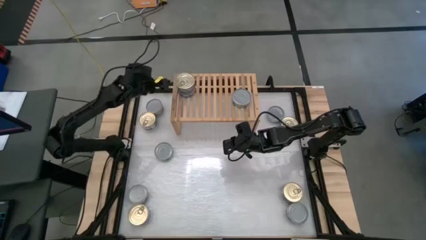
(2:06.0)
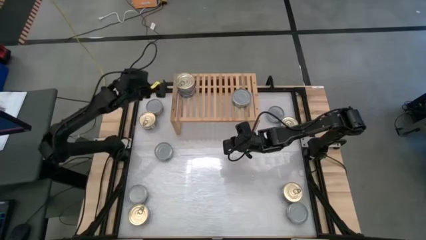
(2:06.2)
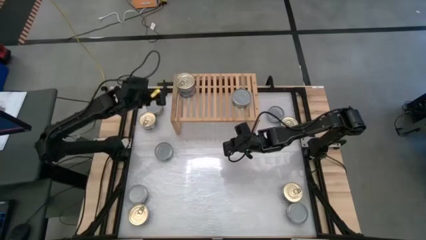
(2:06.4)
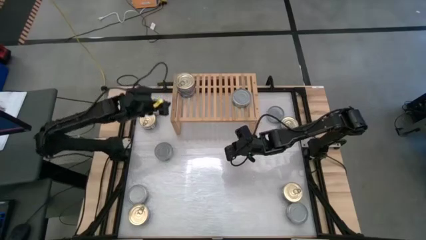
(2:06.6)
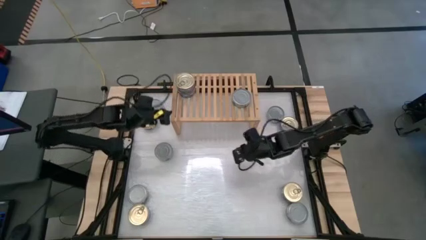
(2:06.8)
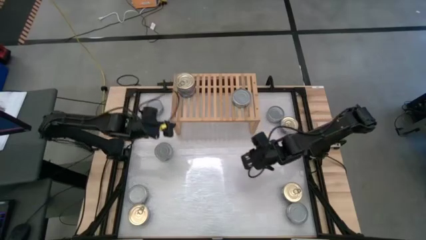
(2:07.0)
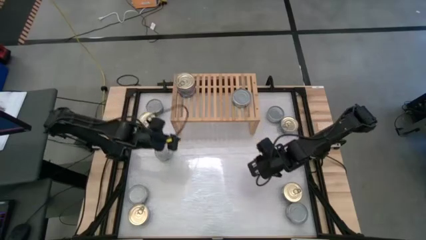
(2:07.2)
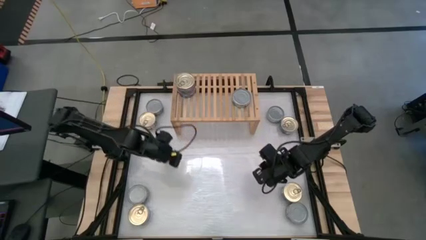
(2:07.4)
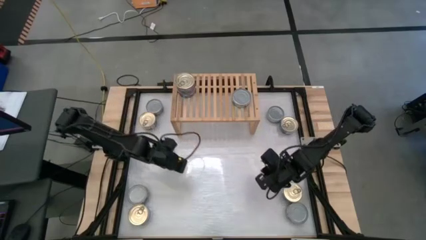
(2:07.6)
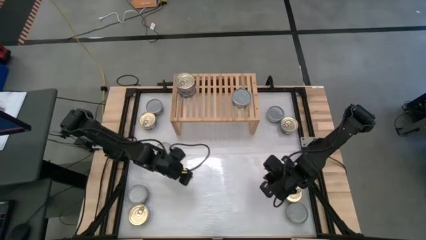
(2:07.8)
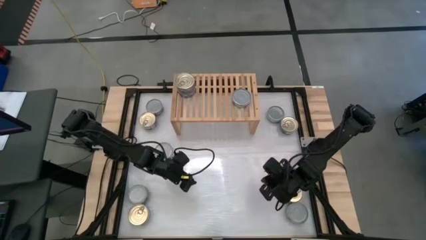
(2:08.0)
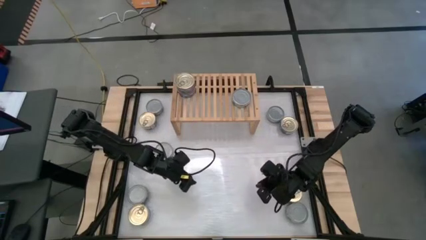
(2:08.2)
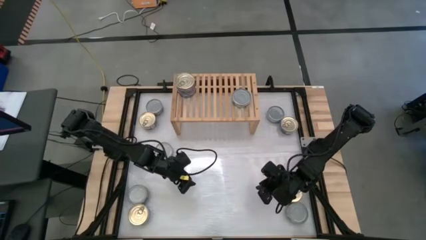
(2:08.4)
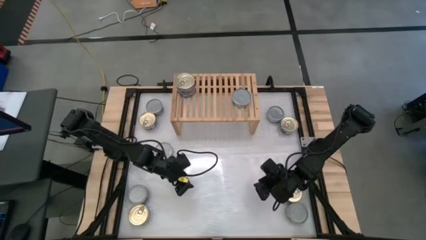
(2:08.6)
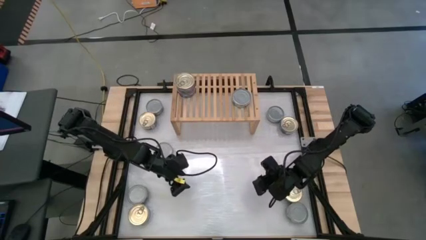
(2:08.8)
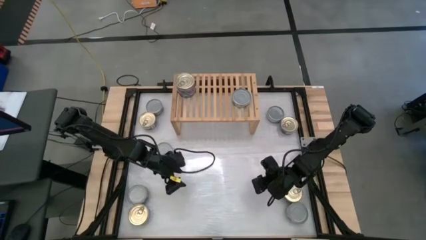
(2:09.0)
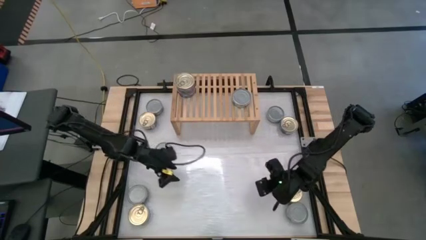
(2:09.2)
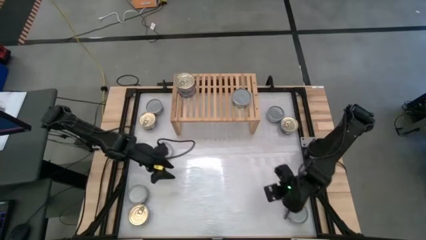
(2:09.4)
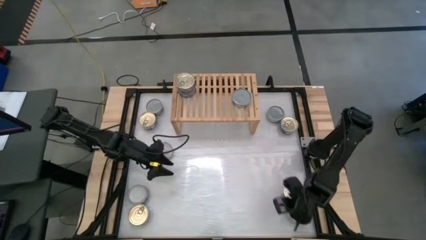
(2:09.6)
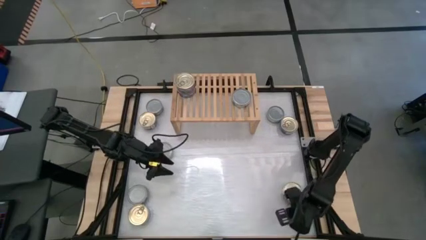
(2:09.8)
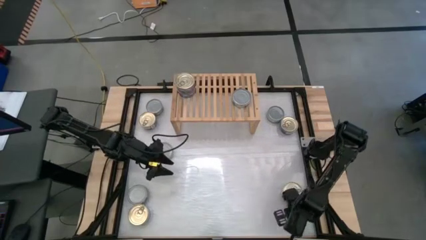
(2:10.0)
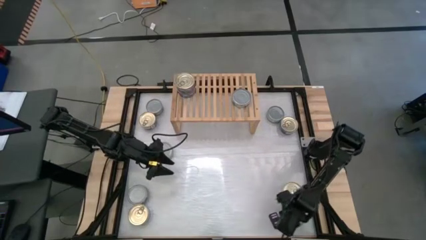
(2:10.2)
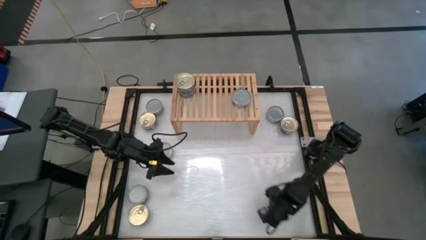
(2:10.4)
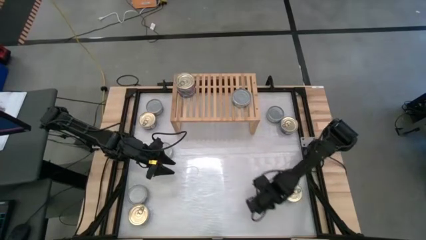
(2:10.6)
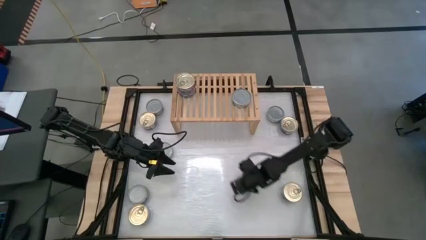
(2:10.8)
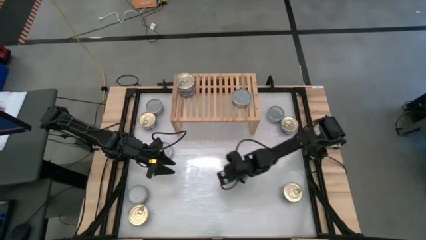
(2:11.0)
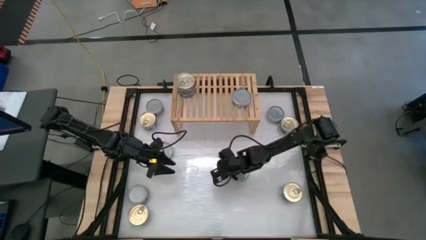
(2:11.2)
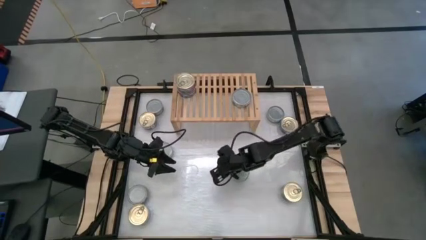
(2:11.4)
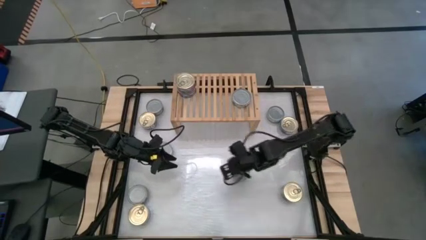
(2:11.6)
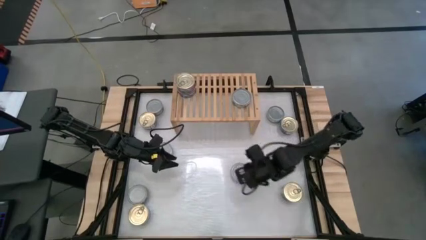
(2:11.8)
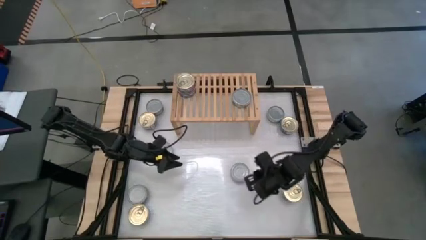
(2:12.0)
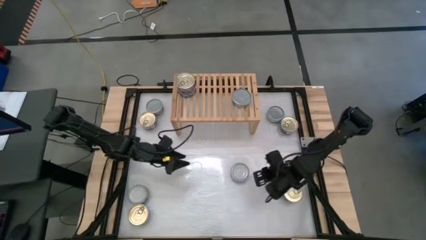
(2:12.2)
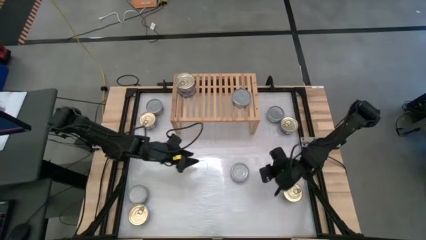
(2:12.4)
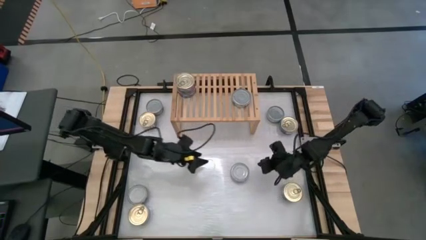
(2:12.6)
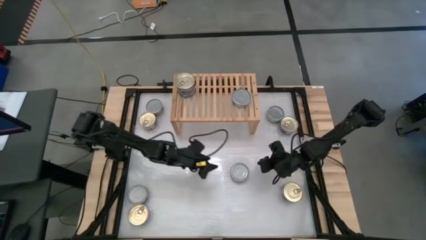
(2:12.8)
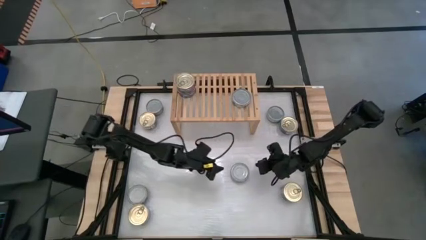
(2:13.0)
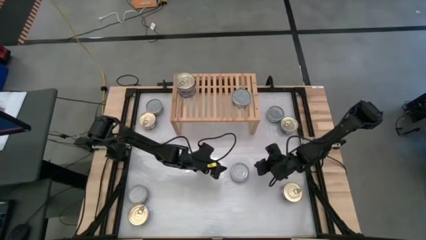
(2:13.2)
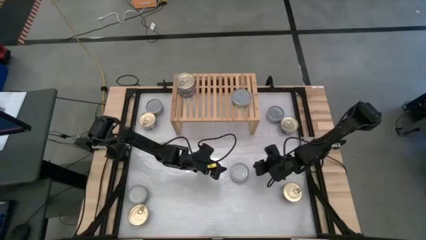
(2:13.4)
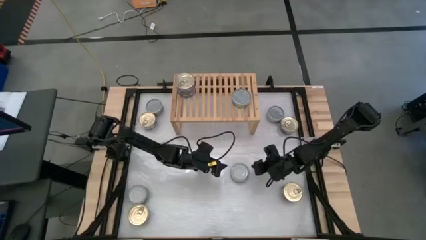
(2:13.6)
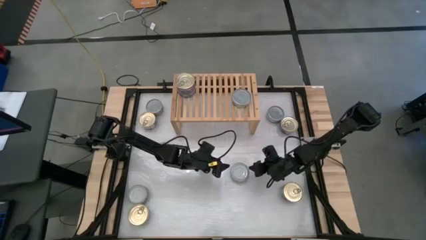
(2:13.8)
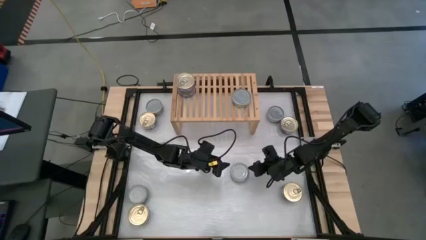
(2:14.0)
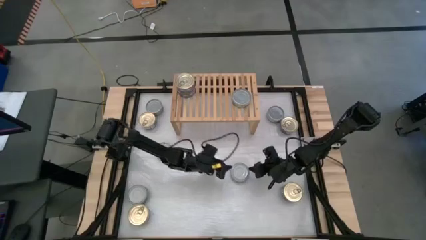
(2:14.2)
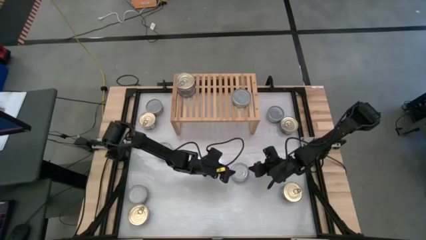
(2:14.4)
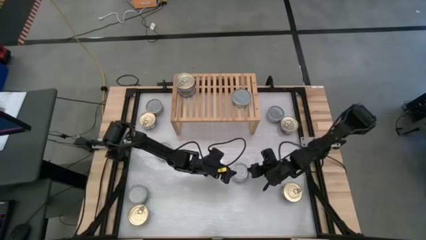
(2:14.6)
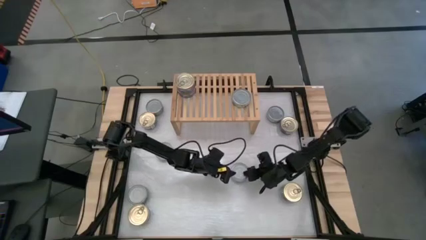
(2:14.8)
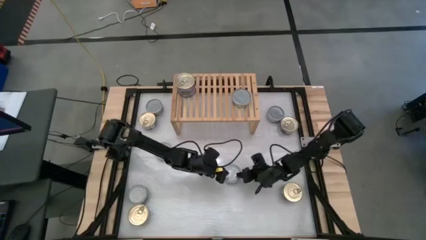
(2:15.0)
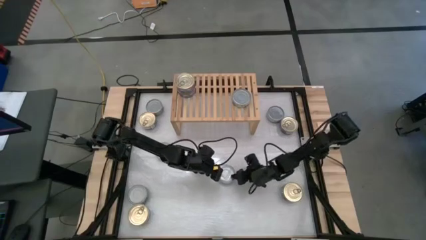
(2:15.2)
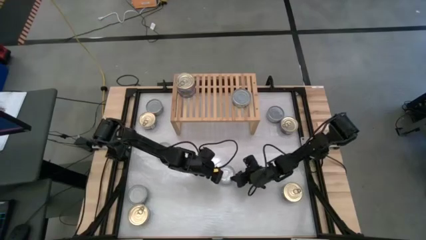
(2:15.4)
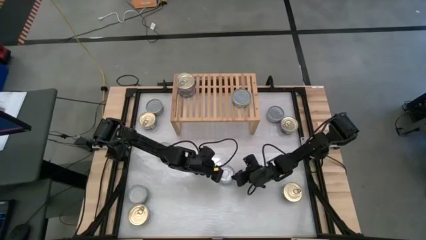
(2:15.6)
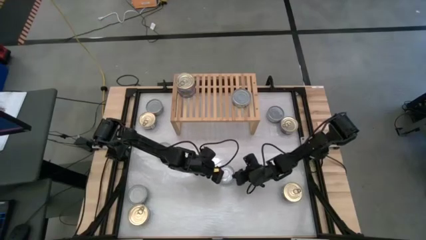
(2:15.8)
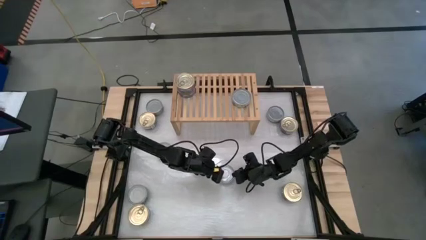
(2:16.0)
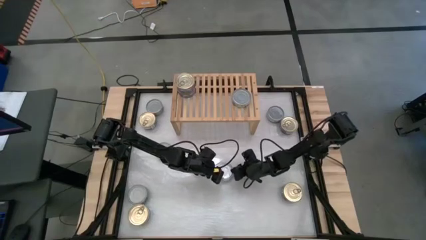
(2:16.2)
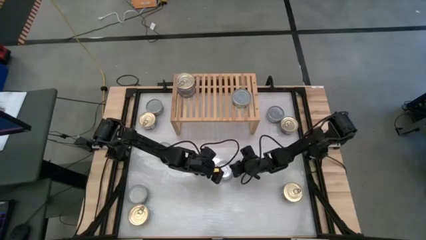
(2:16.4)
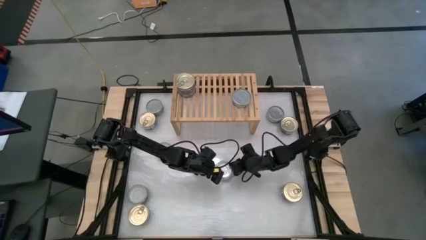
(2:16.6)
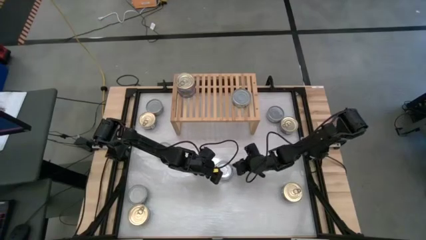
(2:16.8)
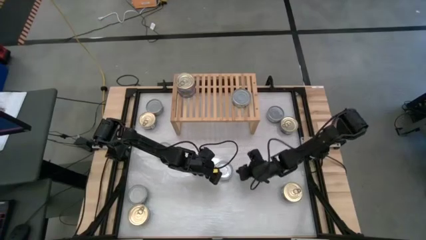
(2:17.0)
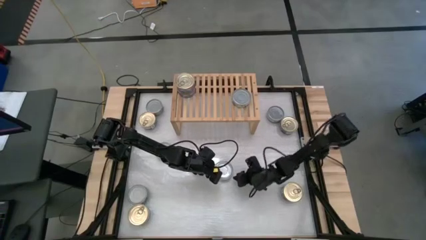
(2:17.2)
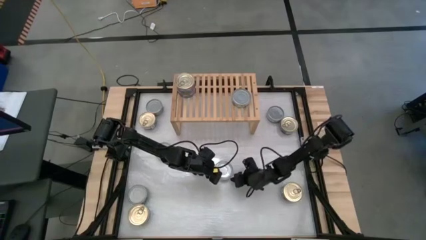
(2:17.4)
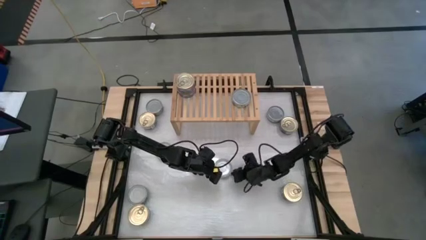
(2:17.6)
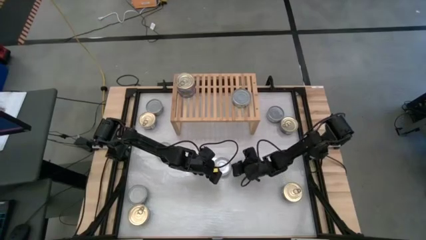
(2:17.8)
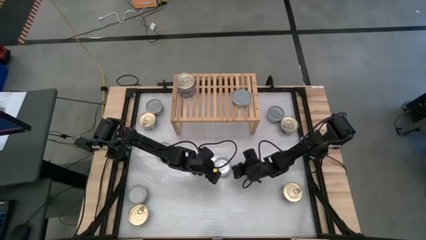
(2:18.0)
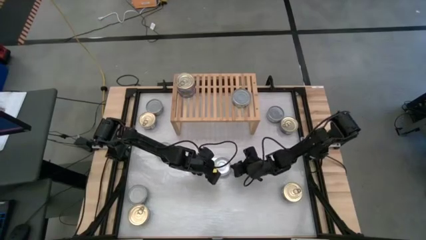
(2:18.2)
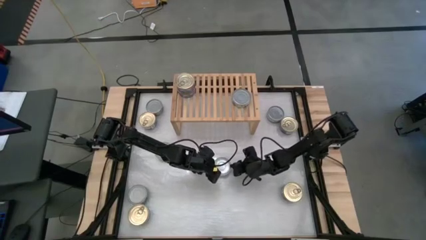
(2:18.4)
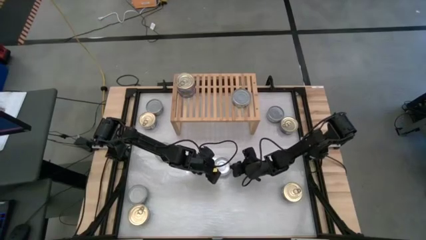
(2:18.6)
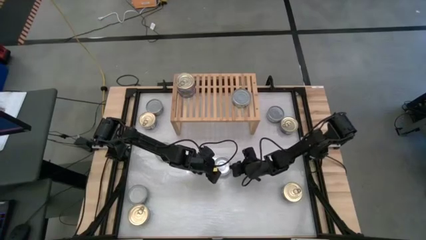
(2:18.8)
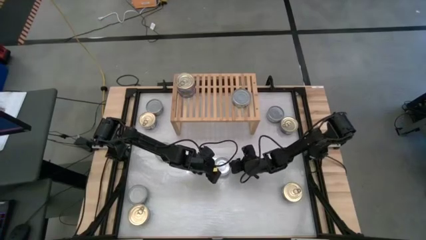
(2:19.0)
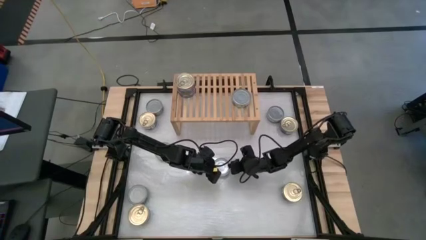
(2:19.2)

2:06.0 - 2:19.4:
Task: Stack canned seafood by type on shelf
Stack the green tuna can on top of the other green tuna can on the shelf

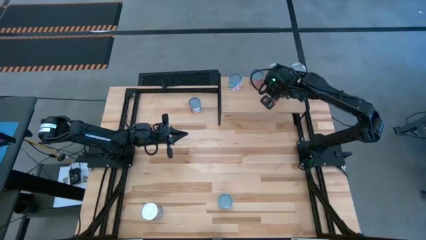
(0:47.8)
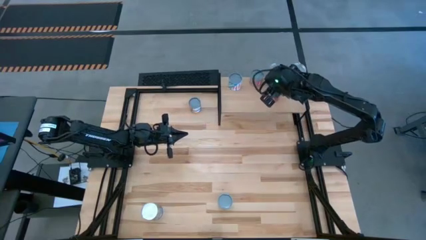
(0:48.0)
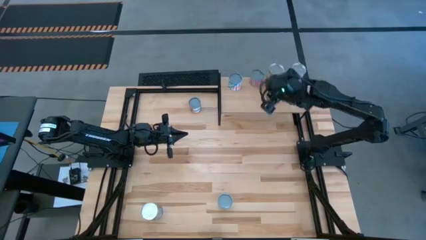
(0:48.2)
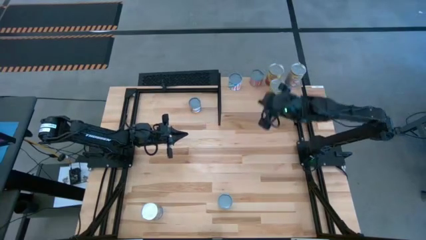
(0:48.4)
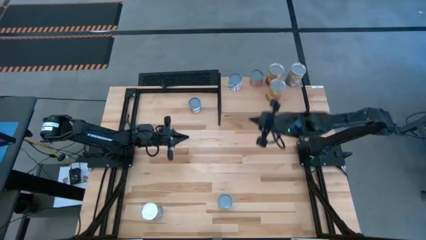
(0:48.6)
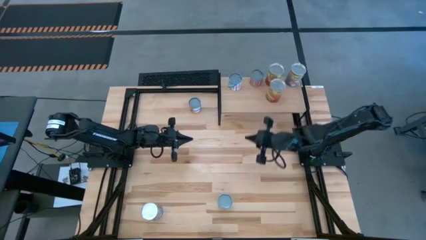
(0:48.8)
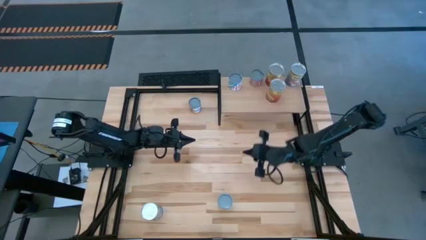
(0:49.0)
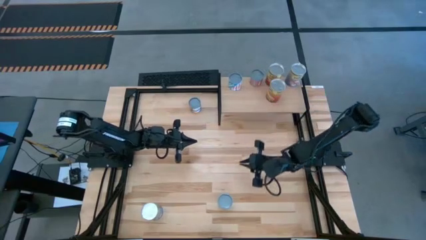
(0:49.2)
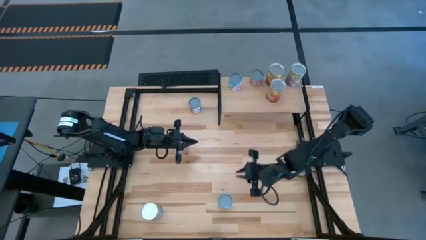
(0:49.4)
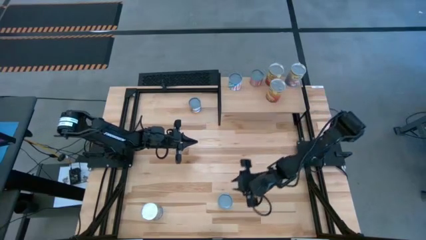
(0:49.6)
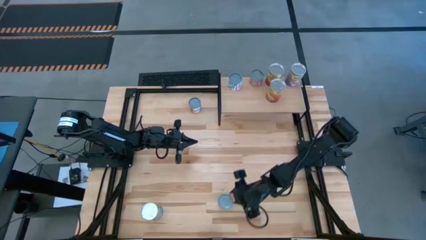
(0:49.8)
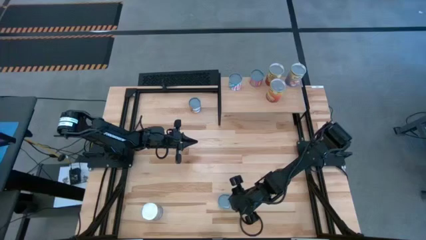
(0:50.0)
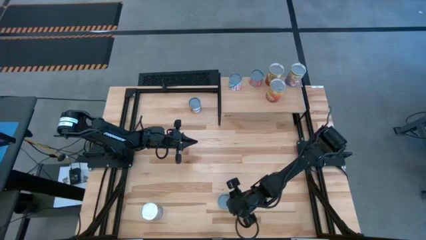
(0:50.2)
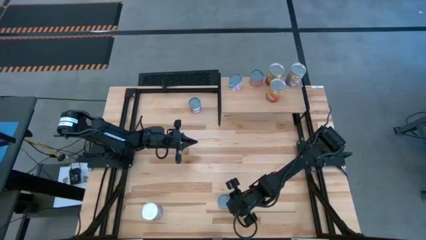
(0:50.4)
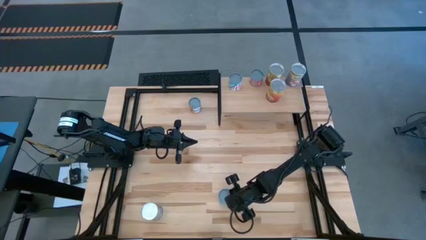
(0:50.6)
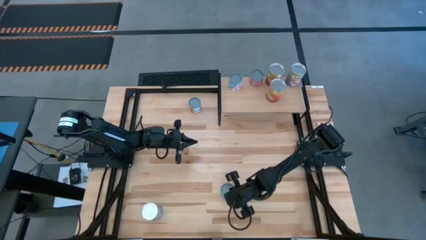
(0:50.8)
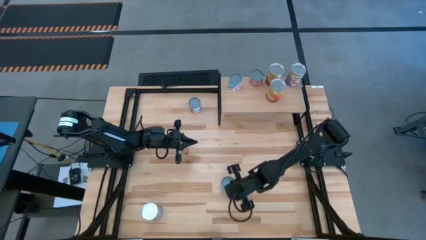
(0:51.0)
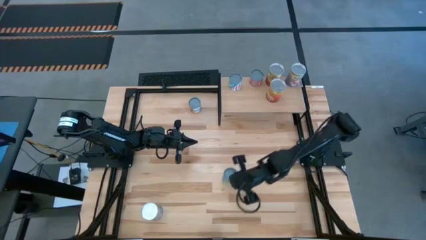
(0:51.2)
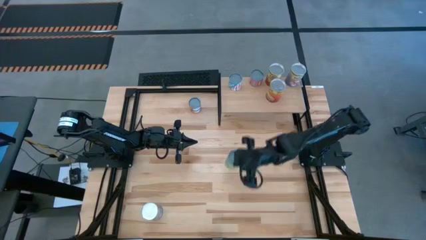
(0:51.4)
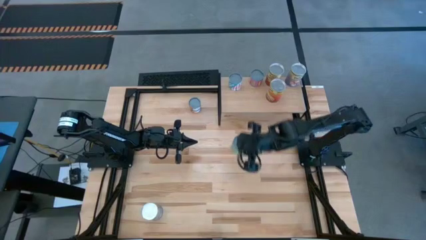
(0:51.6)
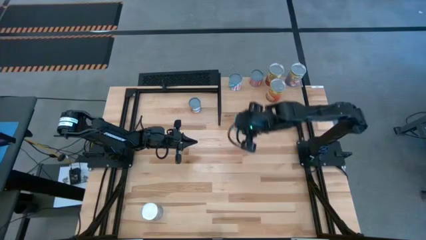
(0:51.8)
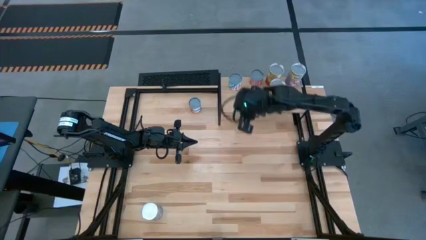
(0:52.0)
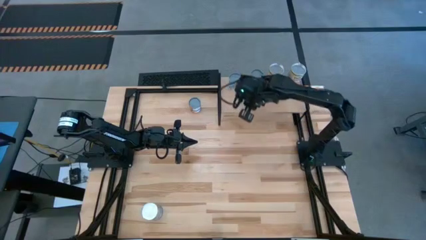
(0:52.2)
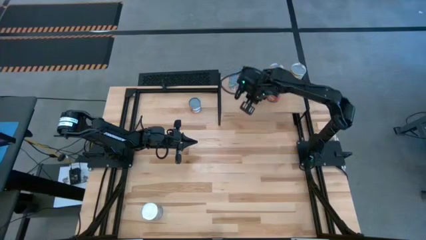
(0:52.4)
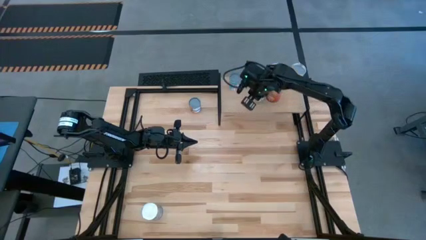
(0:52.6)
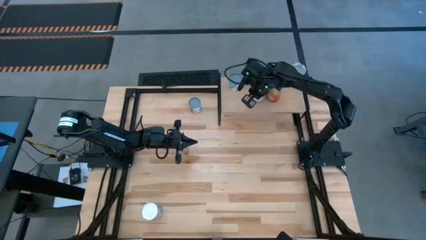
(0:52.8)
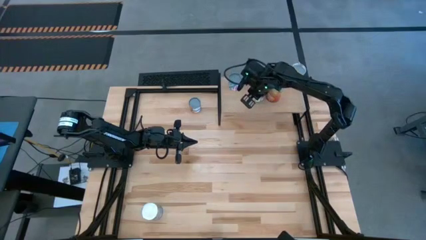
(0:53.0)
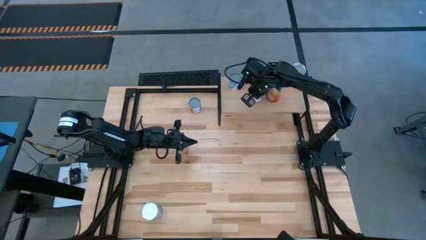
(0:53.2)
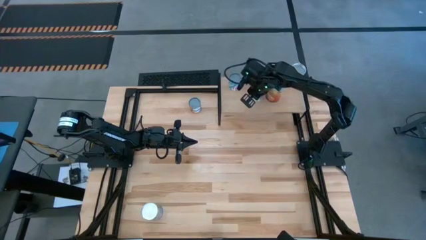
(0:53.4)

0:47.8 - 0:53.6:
Task: Pick and place cans onto a shelf
Put the canned green peas on the shelf
